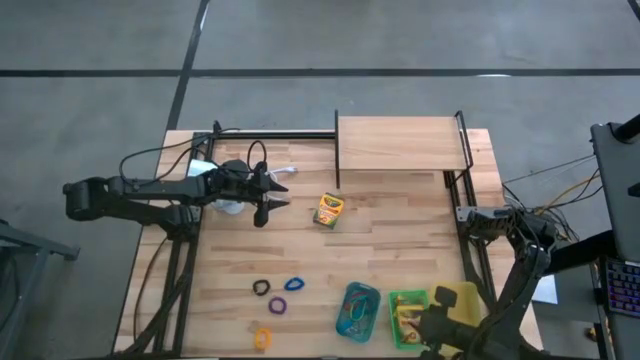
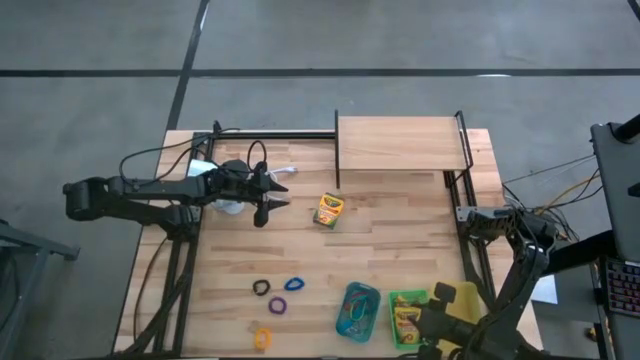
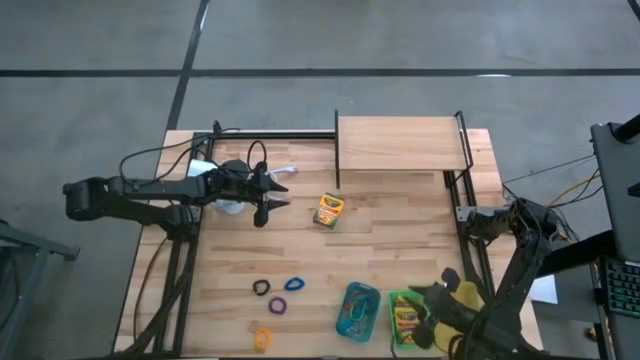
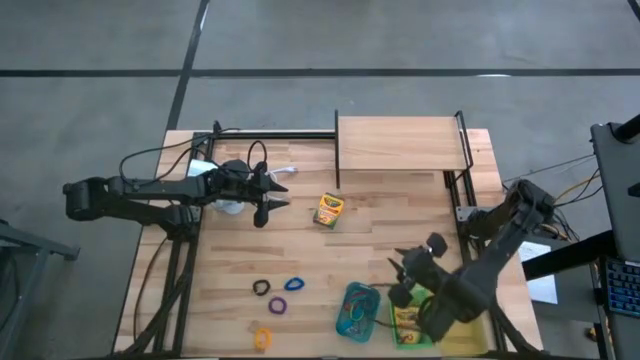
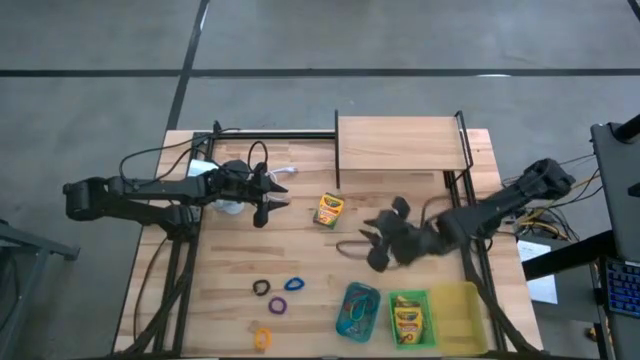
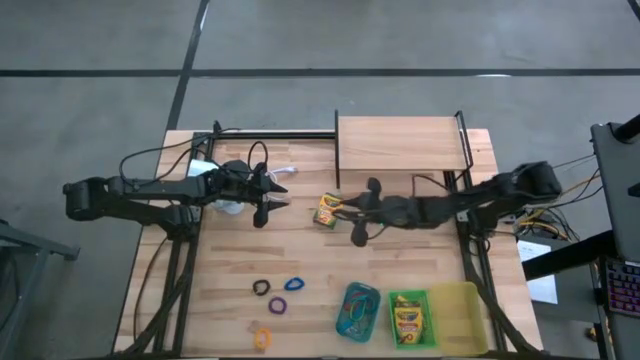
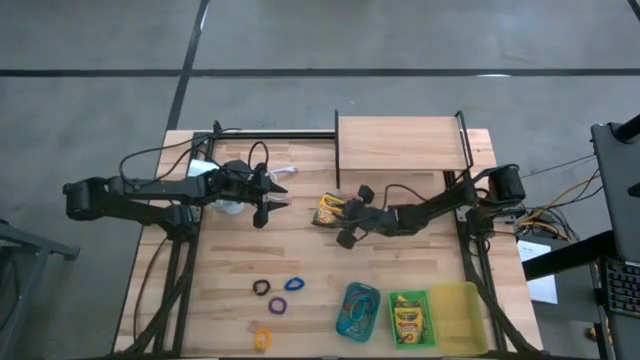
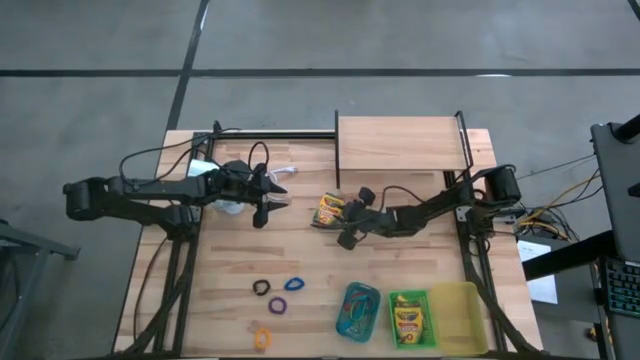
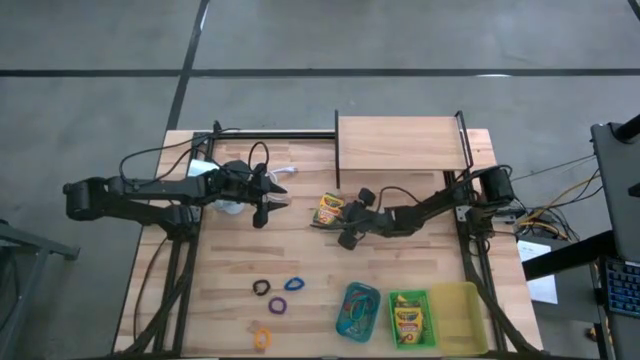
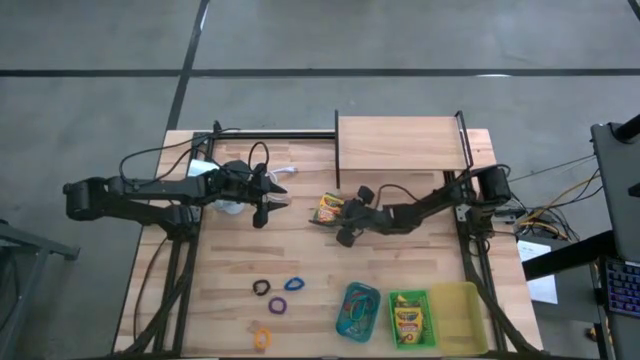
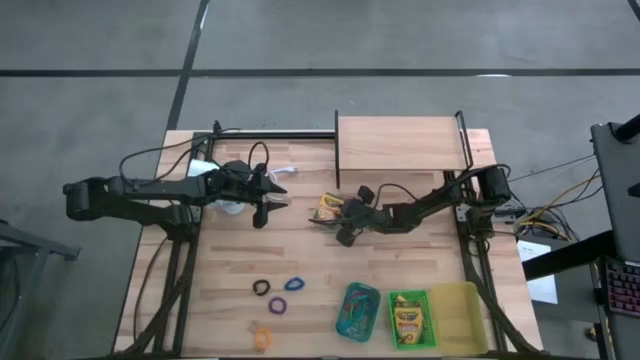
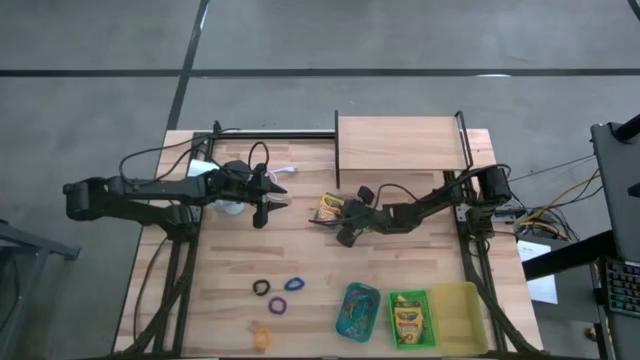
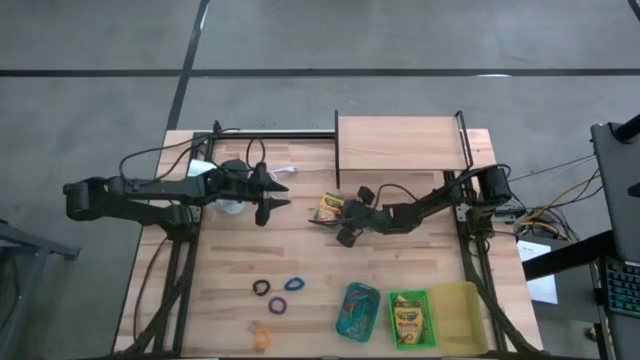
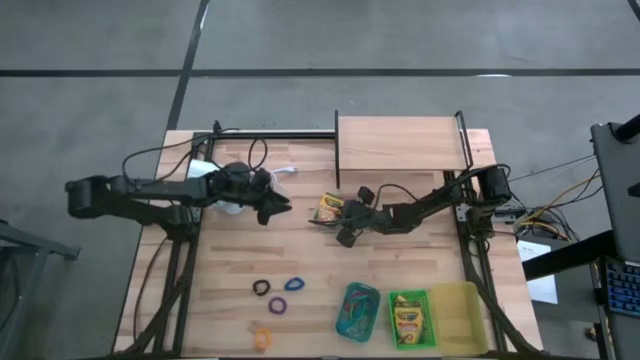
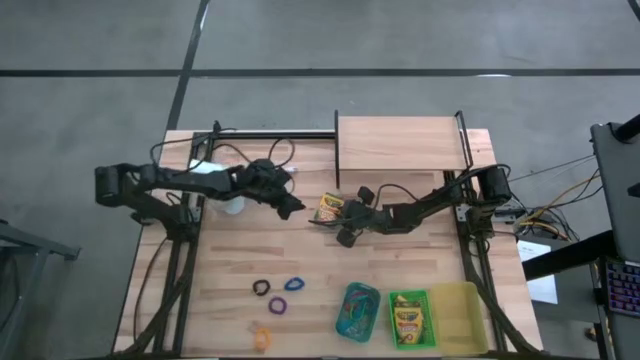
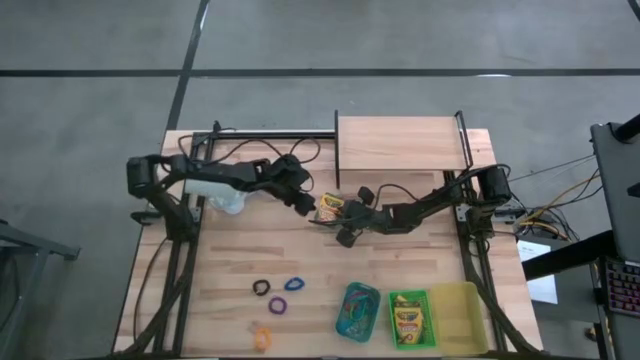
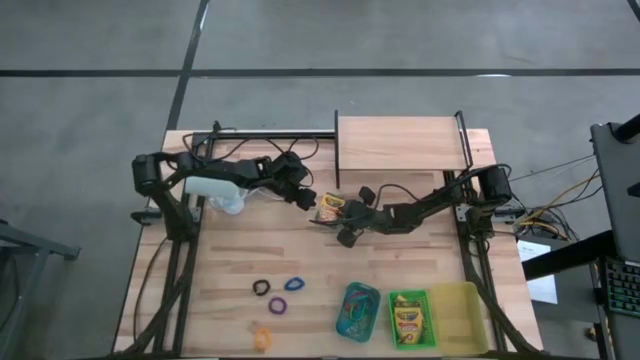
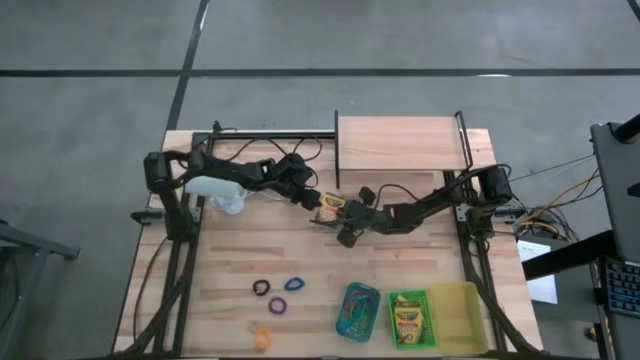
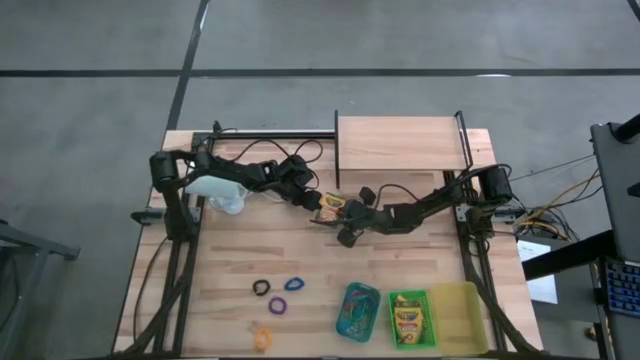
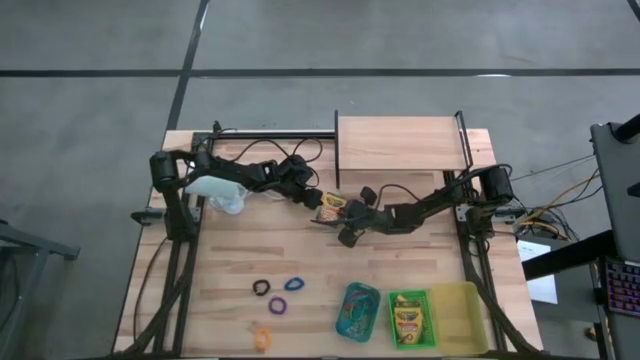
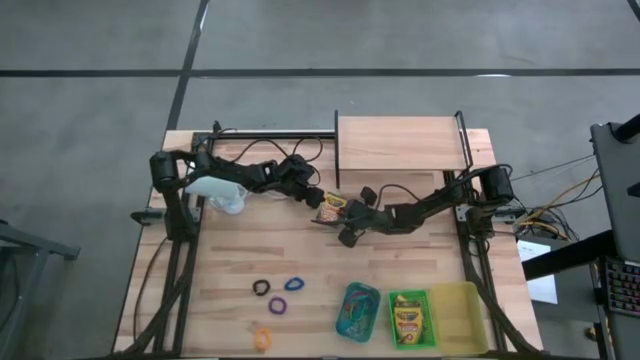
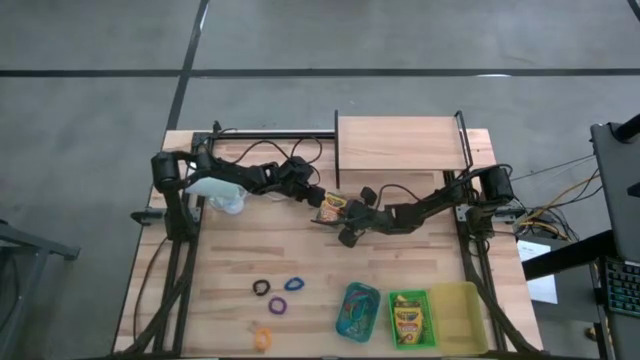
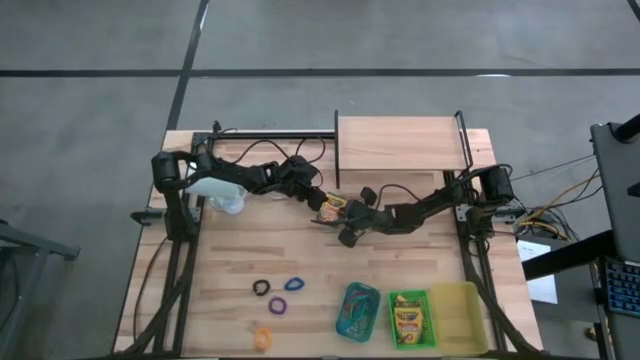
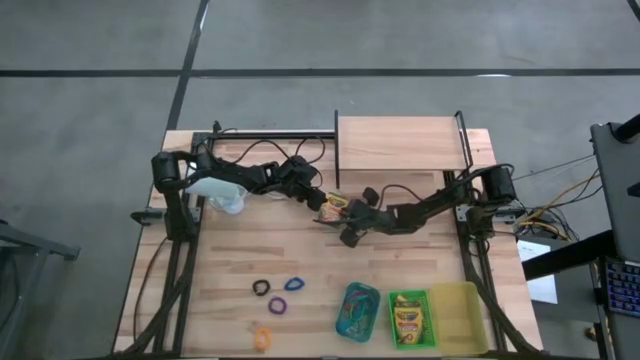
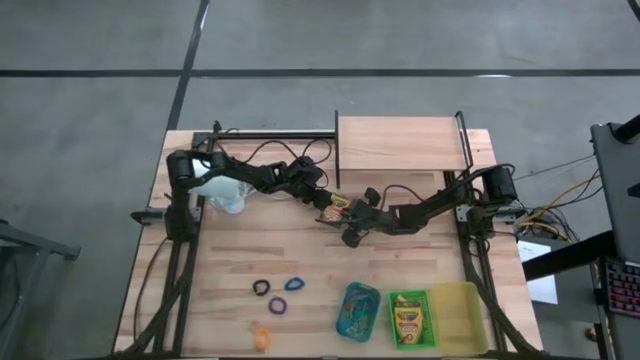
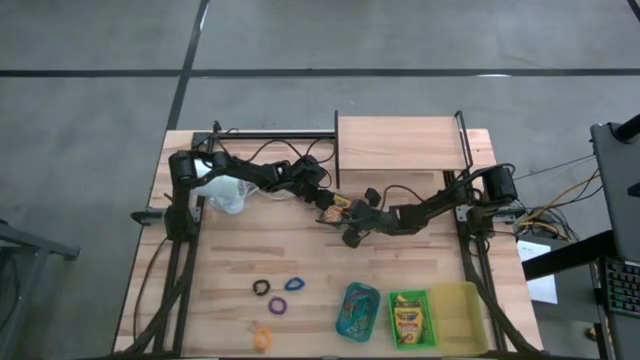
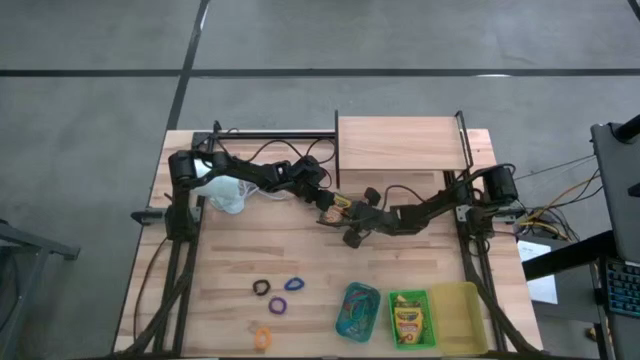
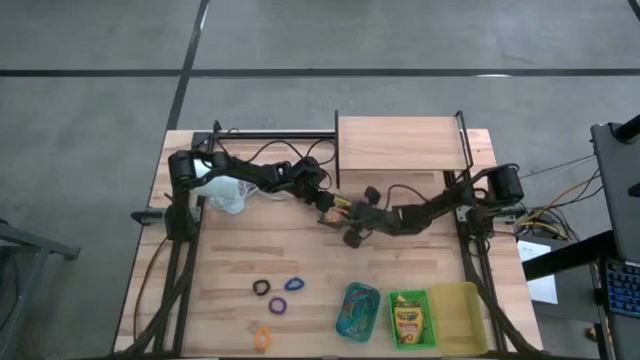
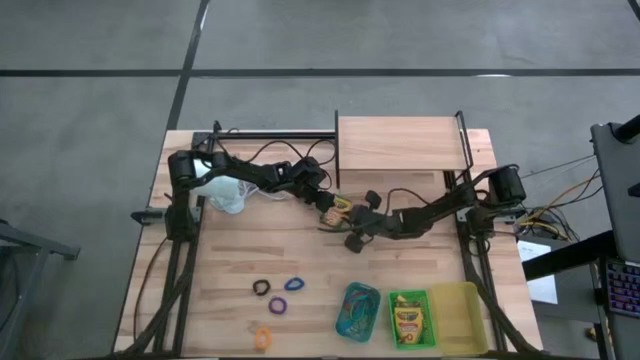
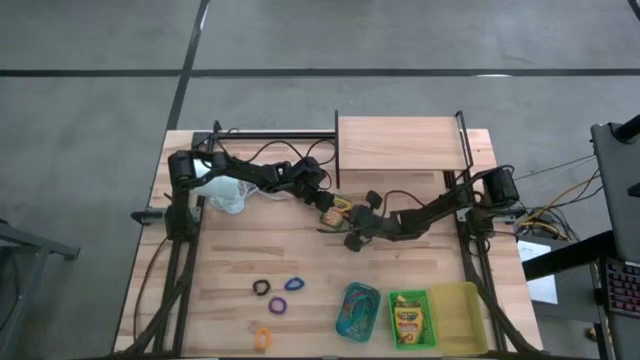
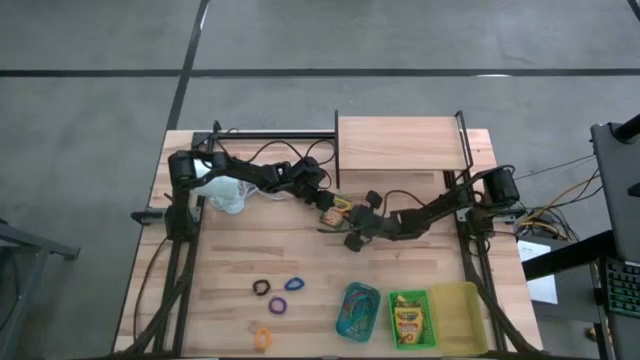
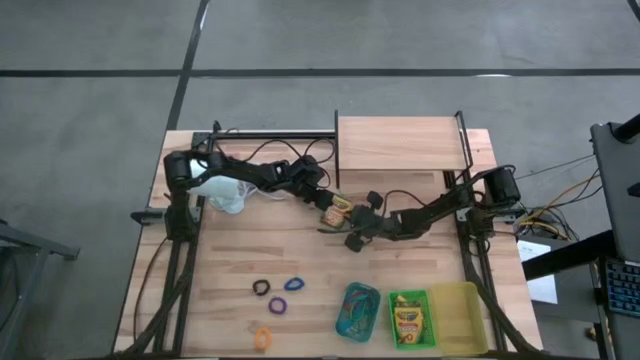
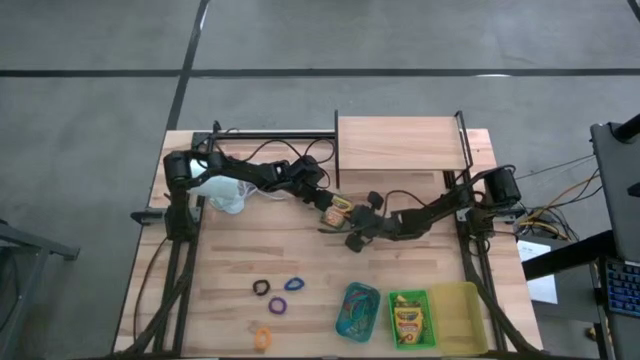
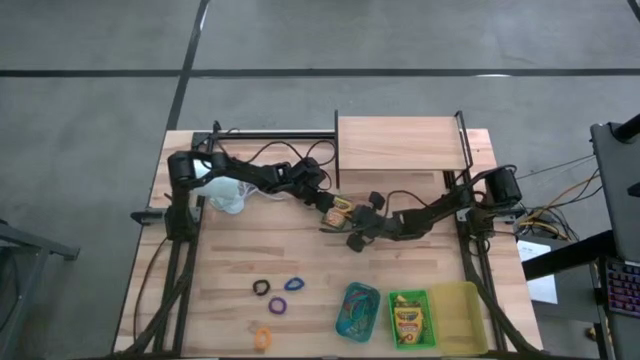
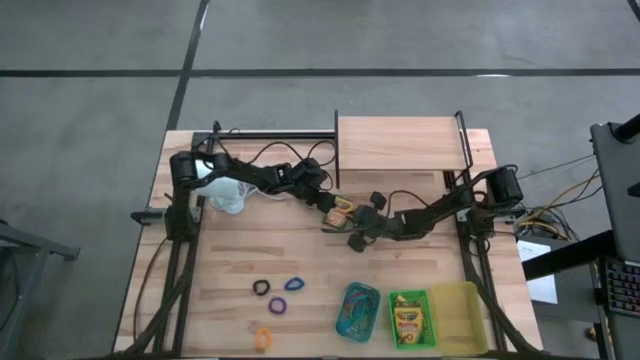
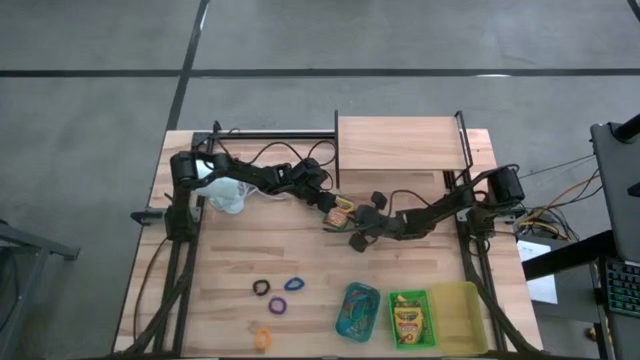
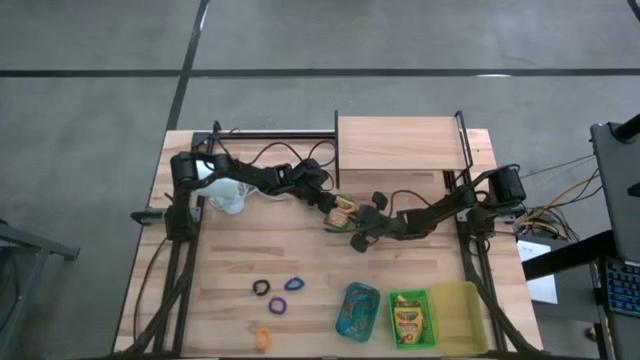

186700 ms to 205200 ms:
Task: Pick & Place Office Desk Supplies
Put the crayon box into the green bin

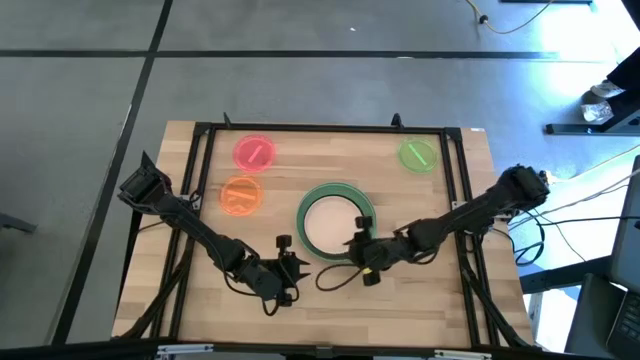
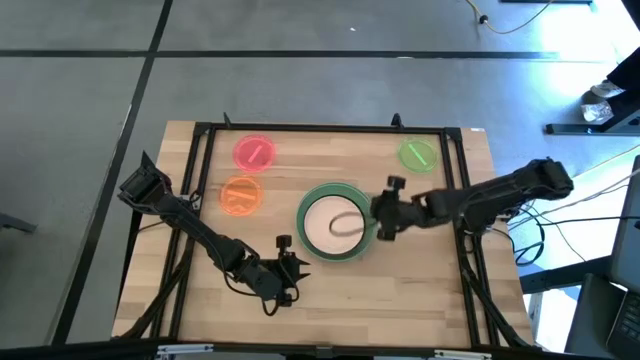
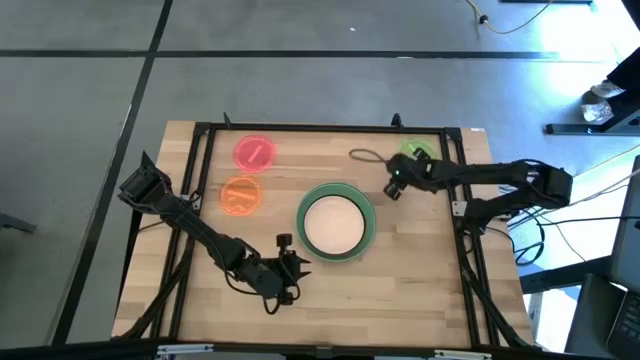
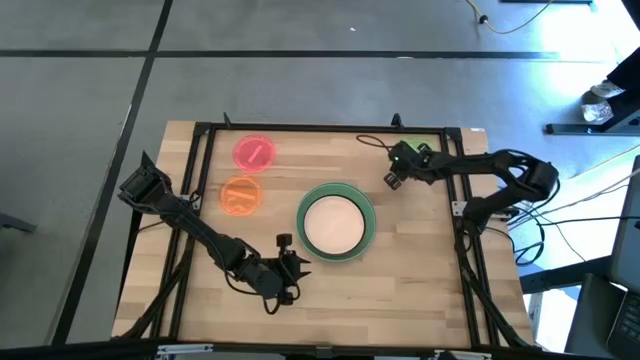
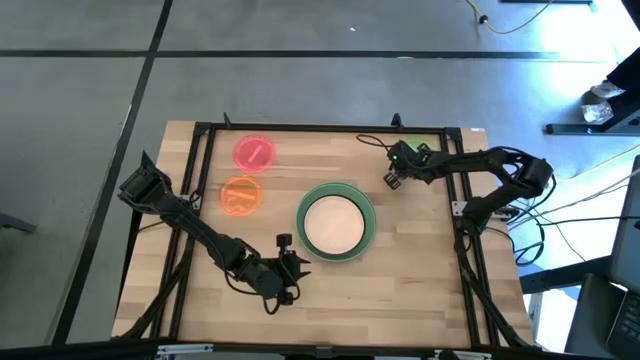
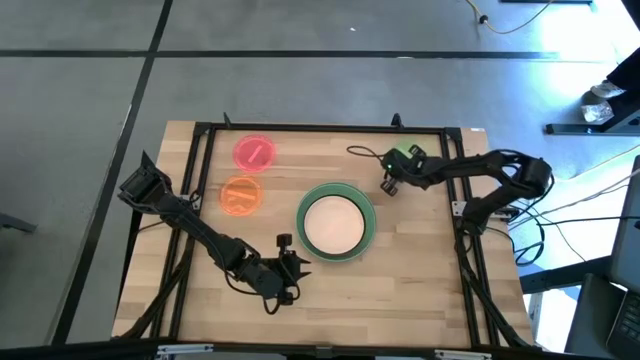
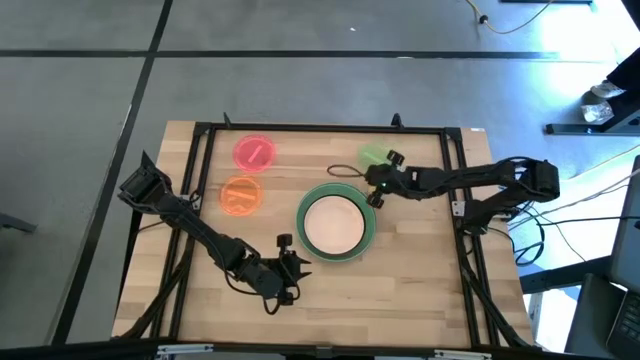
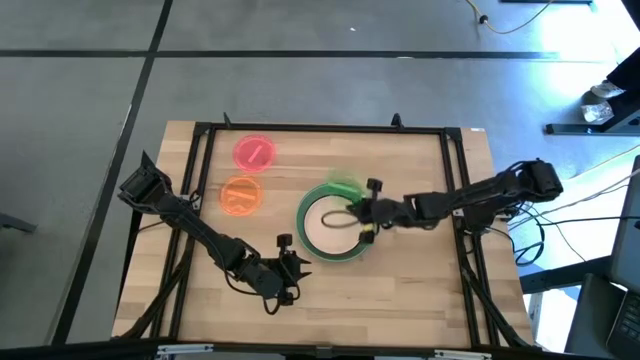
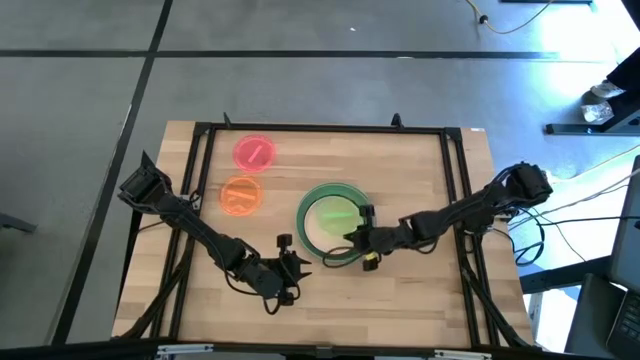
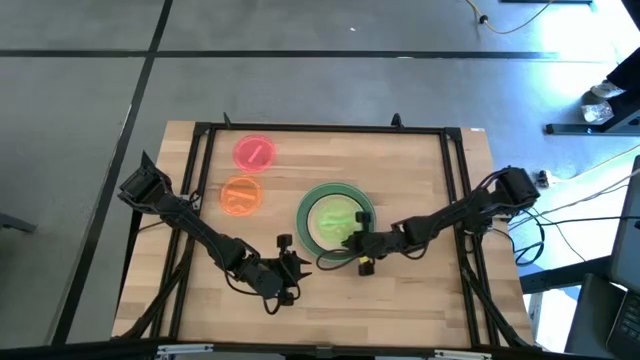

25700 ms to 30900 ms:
Task: Stack plastic plates
Stack the transparent green plate on top of the white plate
